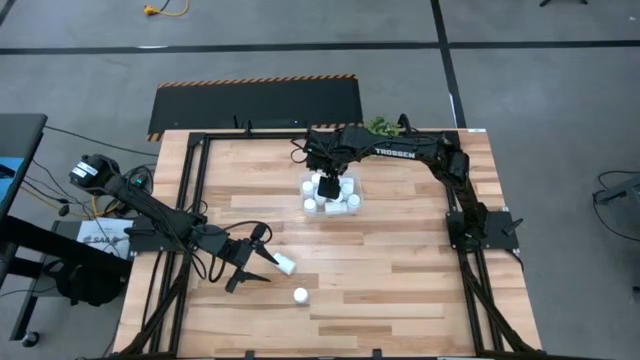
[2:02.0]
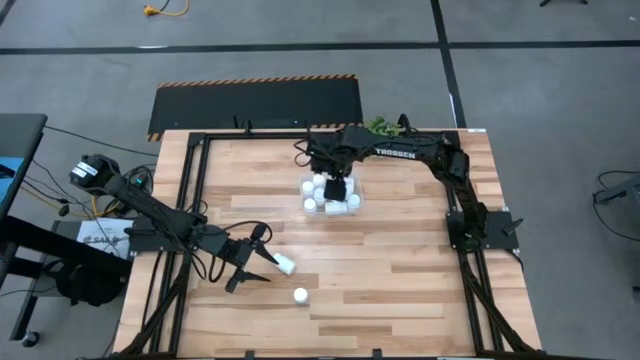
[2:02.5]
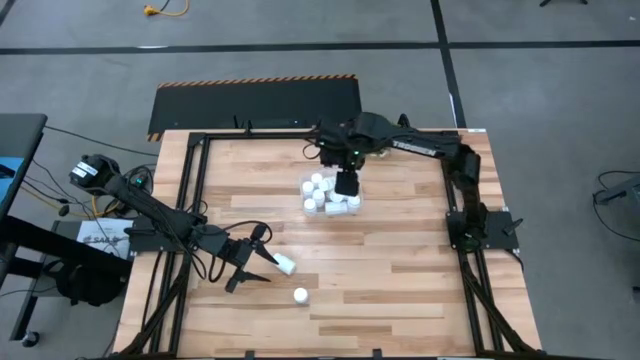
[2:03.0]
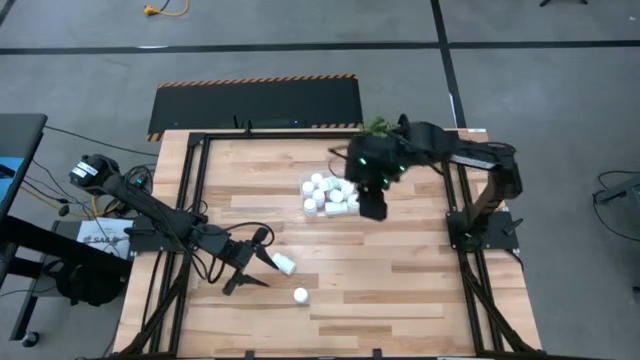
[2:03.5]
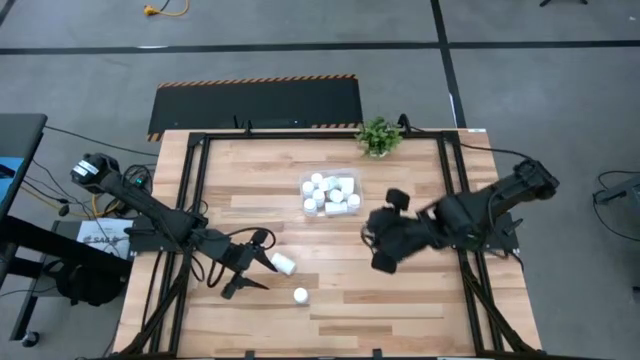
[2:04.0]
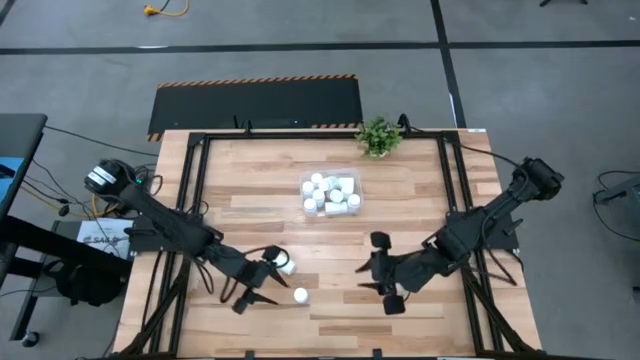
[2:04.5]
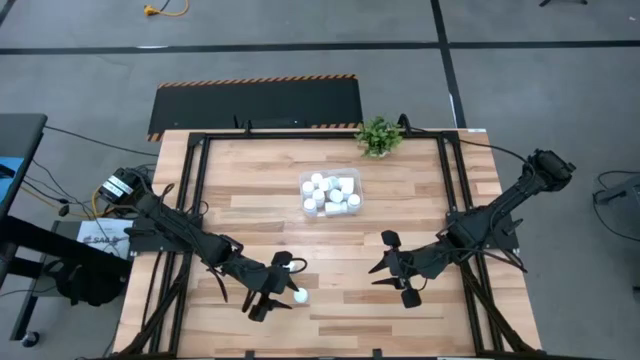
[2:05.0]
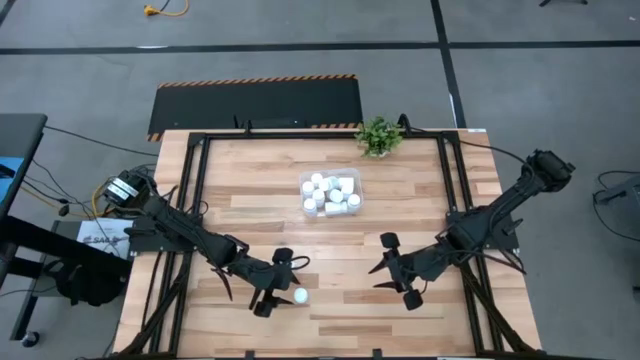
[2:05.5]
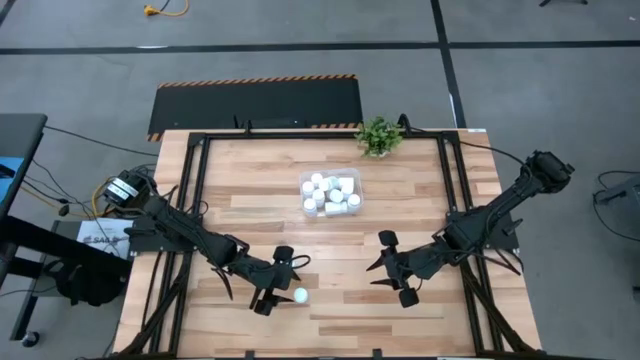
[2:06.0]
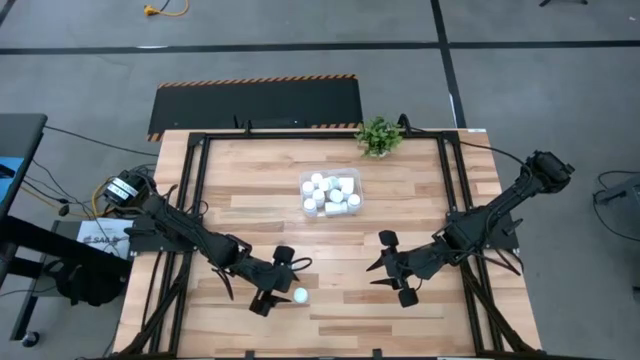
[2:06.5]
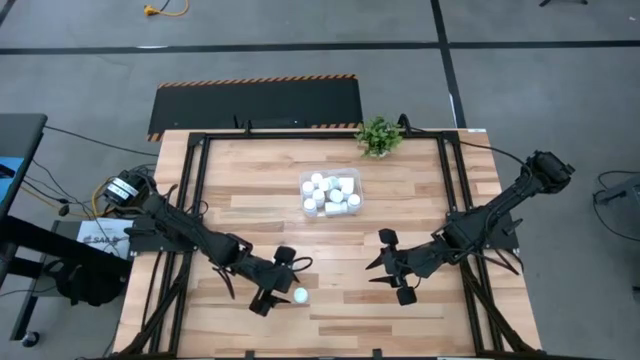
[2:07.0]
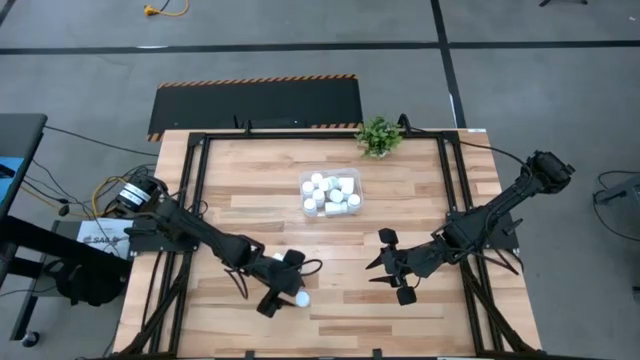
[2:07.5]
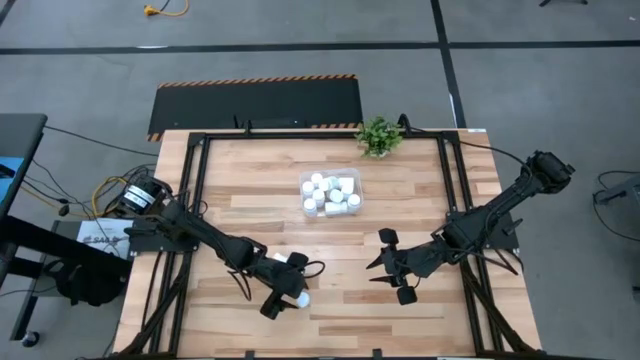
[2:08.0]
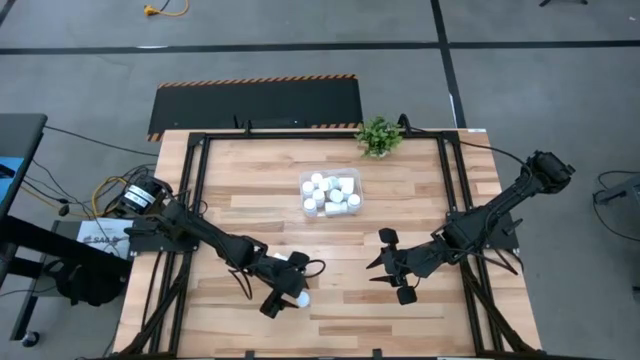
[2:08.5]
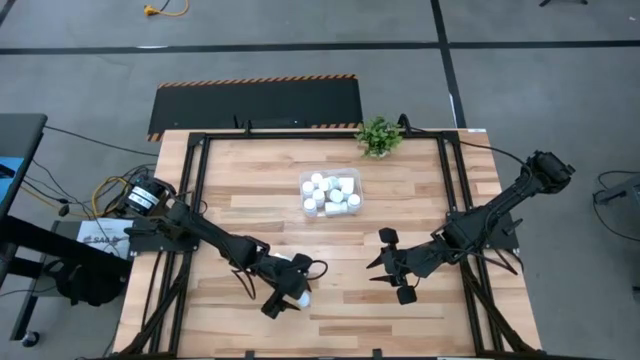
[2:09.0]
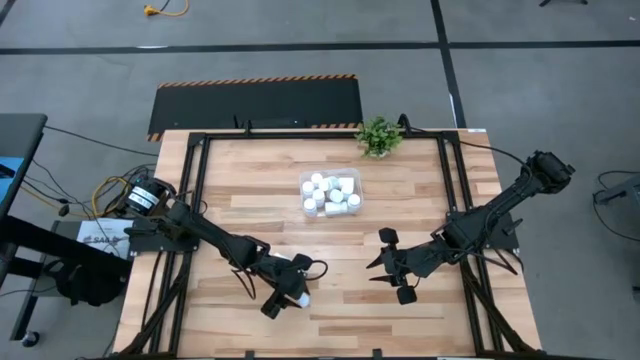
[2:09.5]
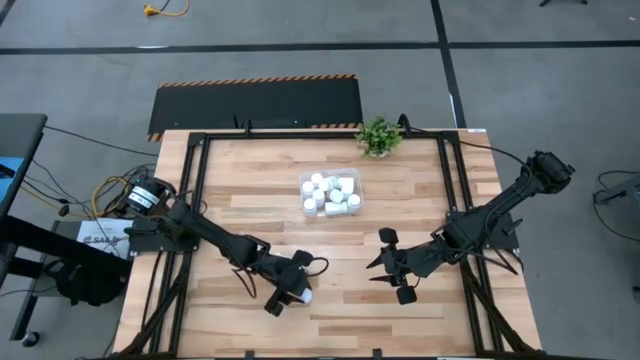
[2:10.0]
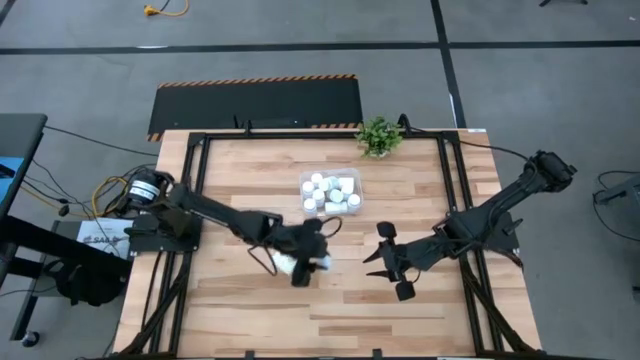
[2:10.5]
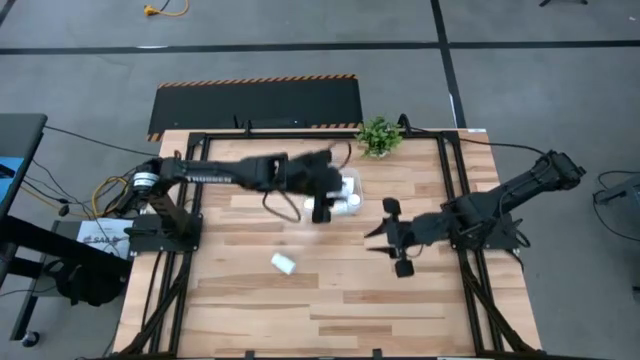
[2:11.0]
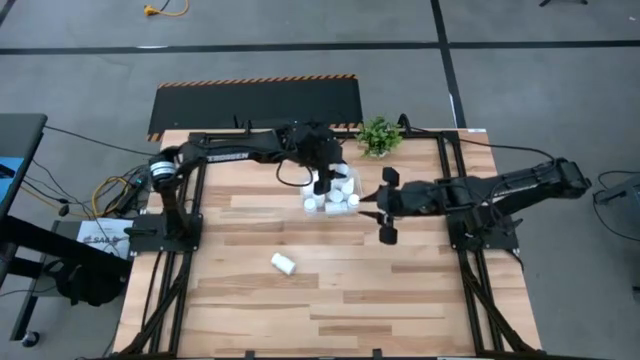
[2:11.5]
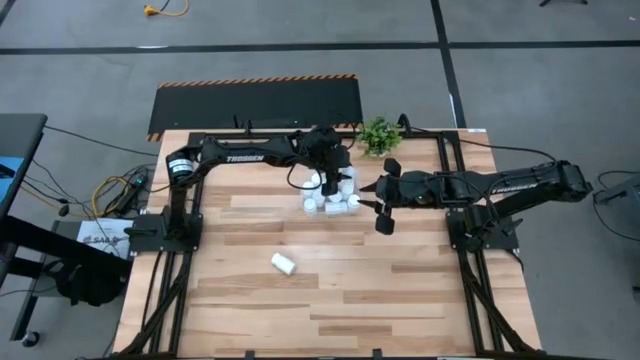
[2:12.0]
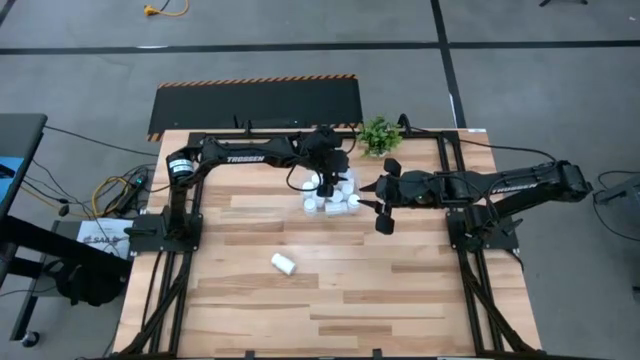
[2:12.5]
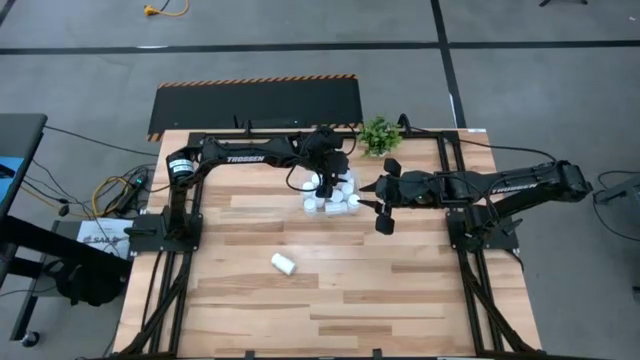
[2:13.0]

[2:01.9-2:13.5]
Task: Pick and place pill bottles into a basket
Put the white medicine bottle into the transparent bin

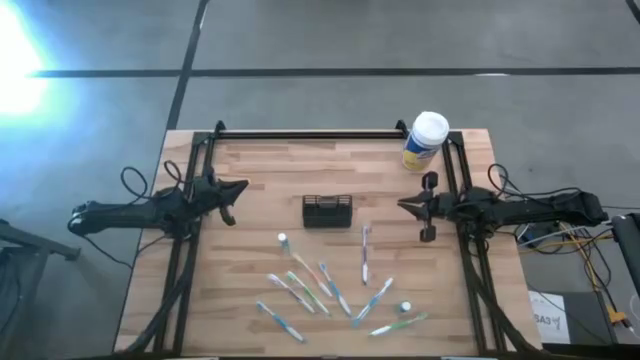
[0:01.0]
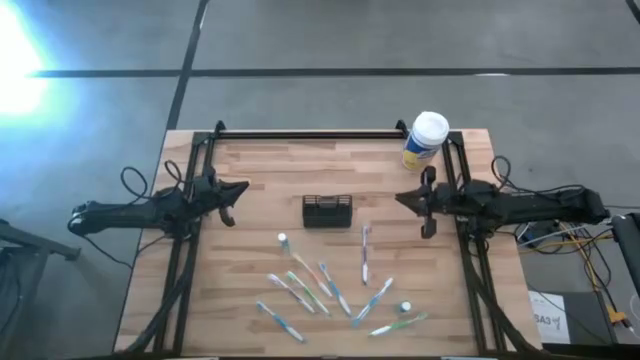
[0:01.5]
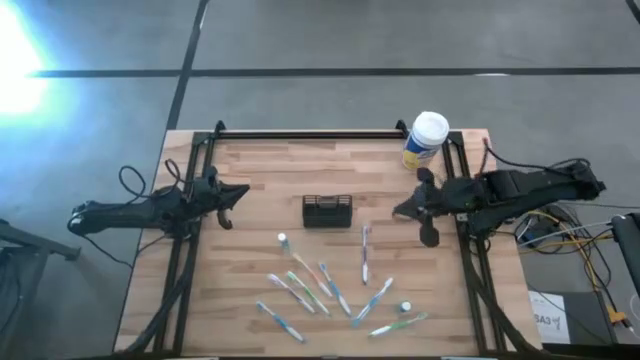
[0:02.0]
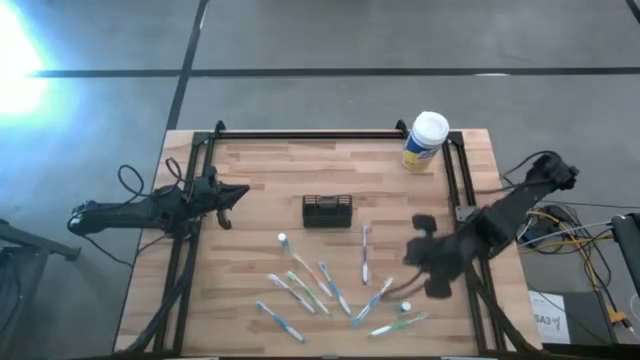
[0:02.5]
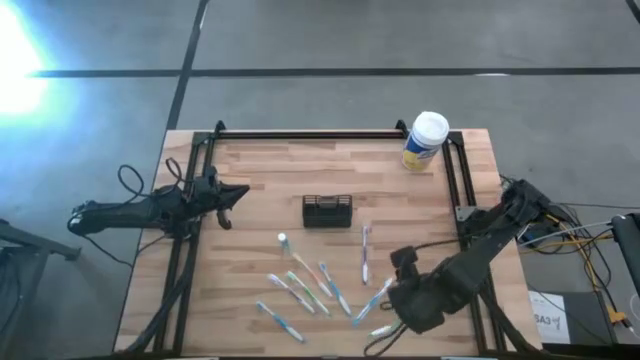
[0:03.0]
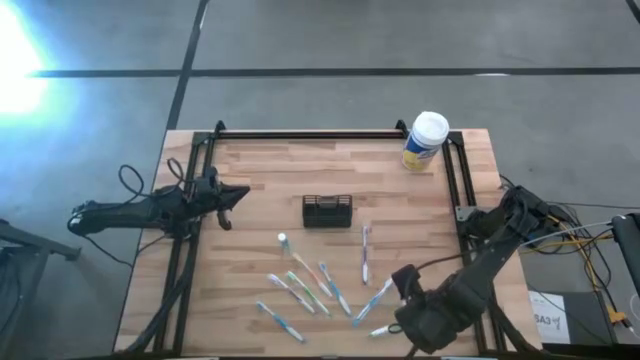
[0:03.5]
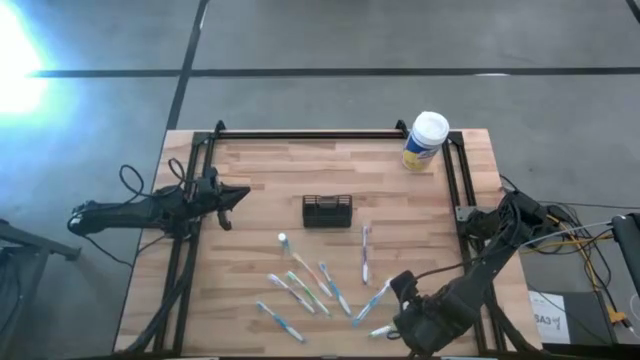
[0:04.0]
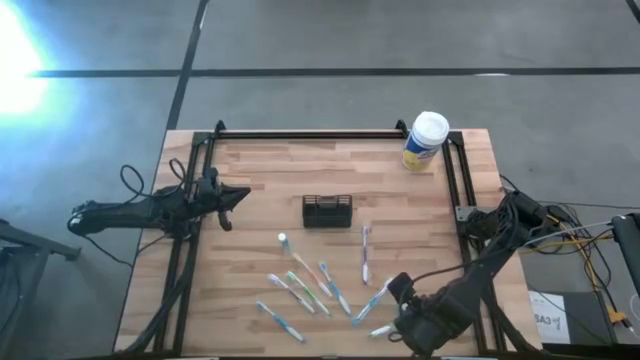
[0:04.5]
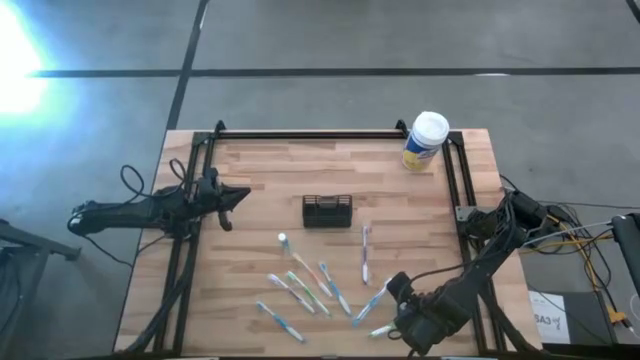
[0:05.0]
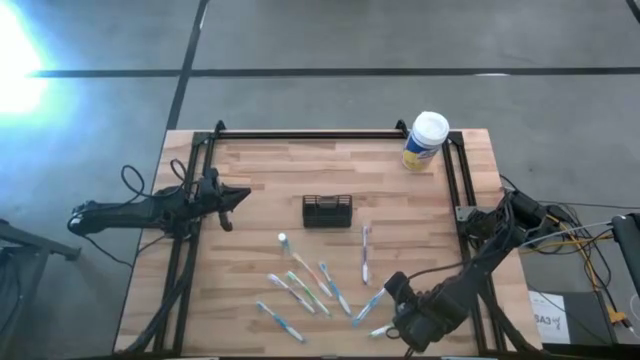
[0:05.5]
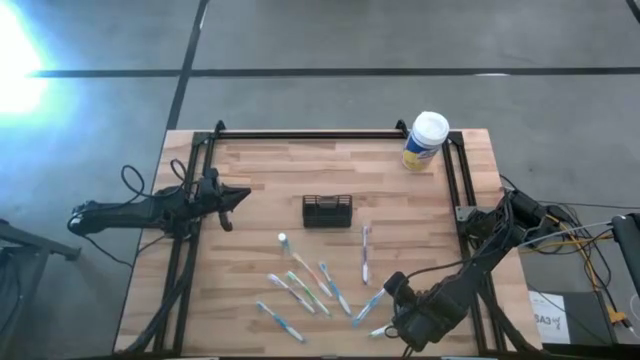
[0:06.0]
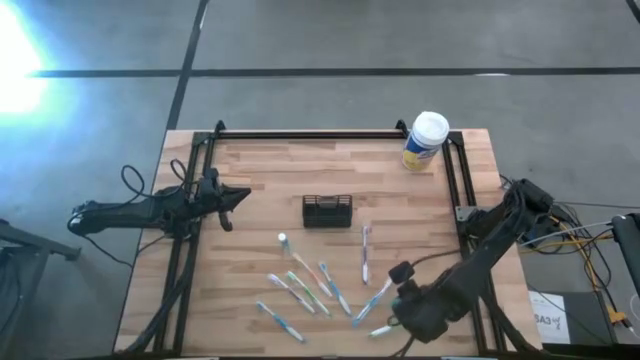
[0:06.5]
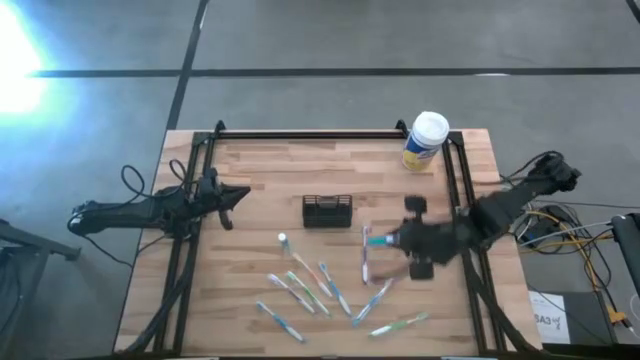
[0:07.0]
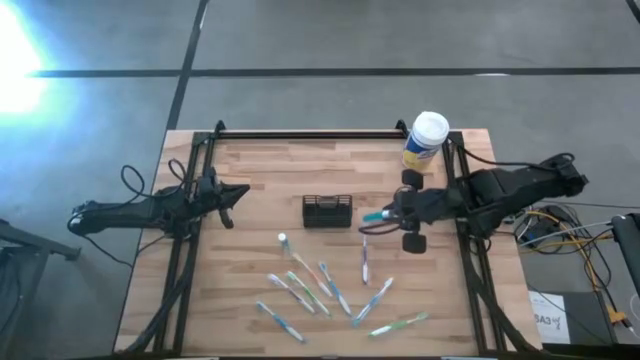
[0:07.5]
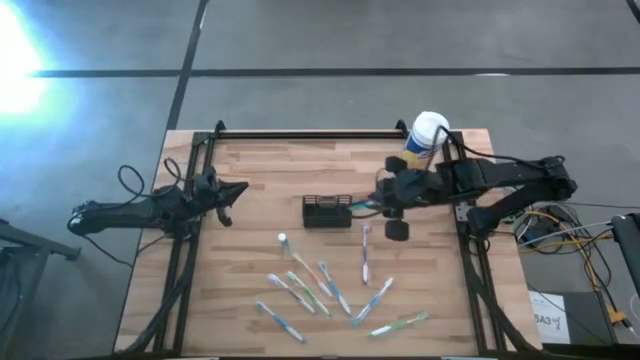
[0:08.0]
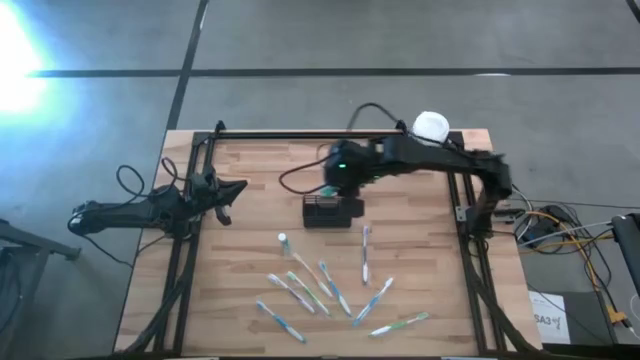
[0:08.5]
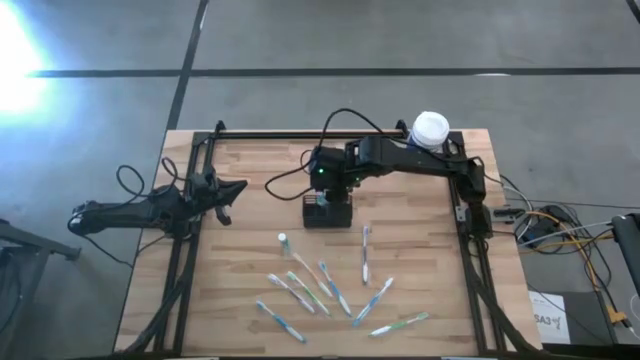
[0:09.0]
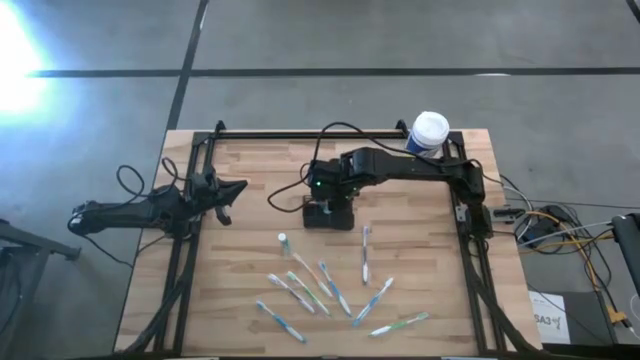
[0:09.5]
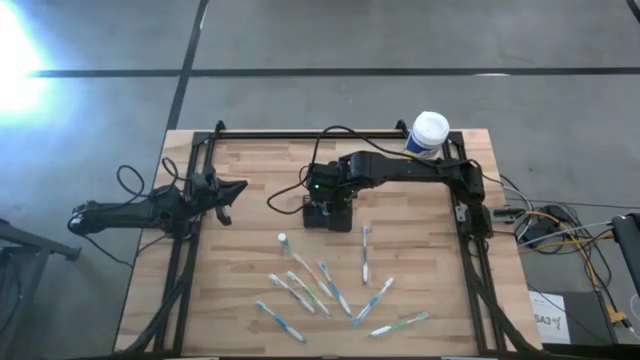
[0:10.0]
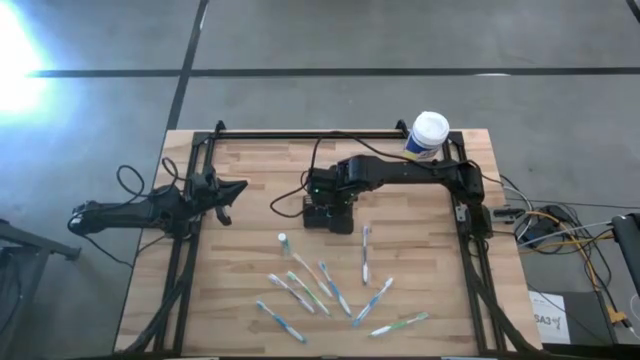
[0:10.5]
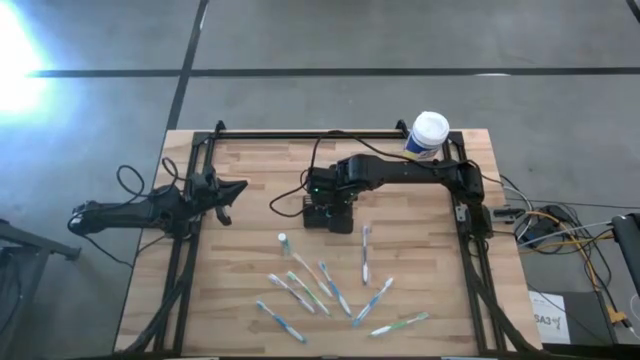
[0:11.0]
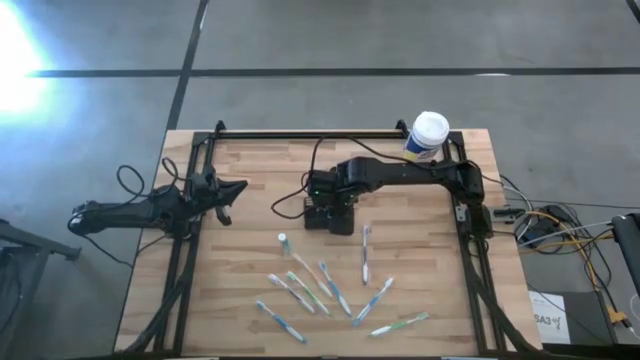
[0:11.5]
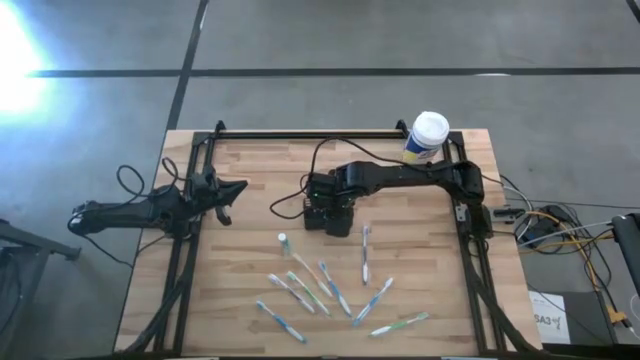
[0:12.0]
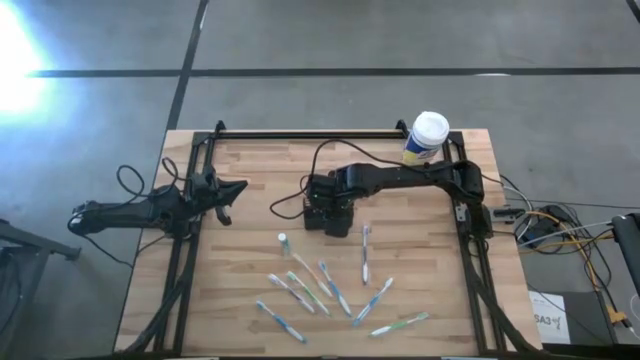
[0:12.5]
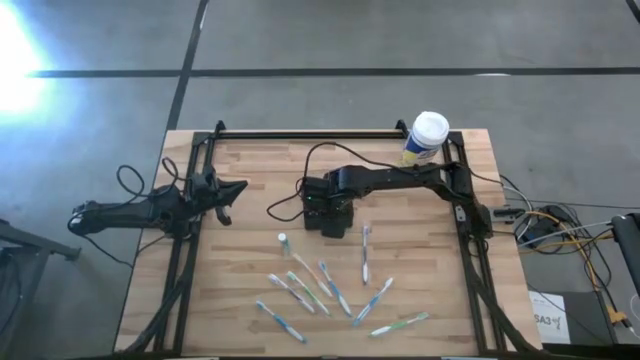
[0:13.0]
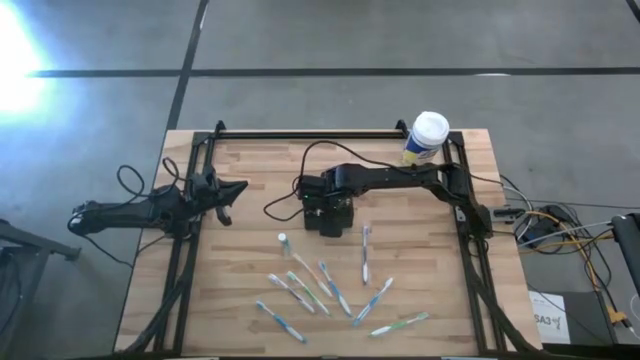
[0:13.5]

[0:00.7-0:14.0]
Task: Pick & Place toothbrushing station
Put the bottom blue mouthwash into the black wire organizer
